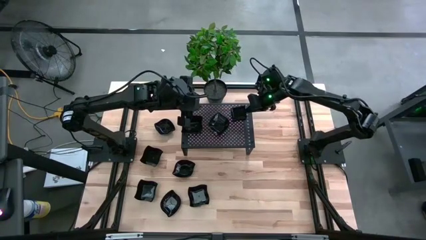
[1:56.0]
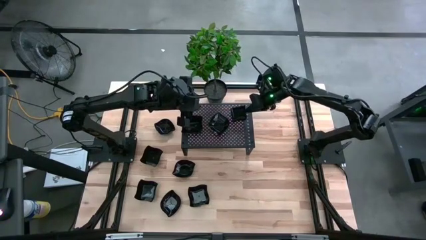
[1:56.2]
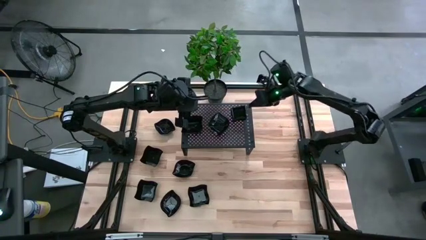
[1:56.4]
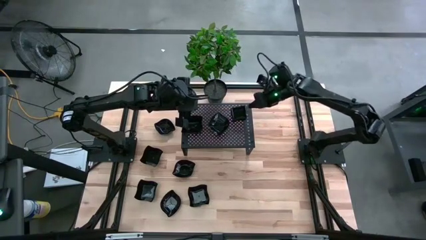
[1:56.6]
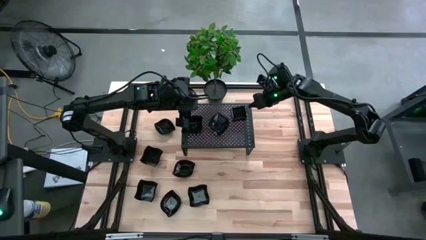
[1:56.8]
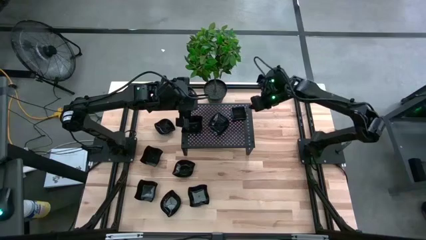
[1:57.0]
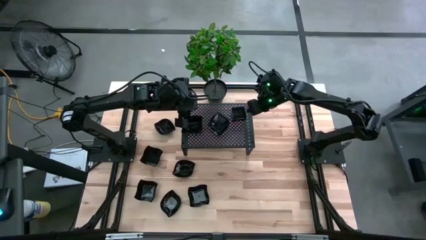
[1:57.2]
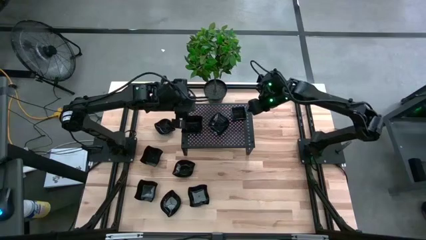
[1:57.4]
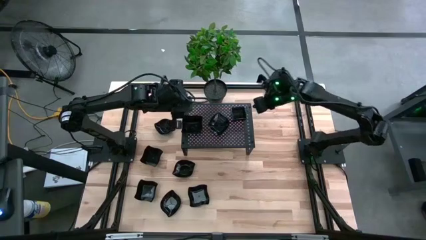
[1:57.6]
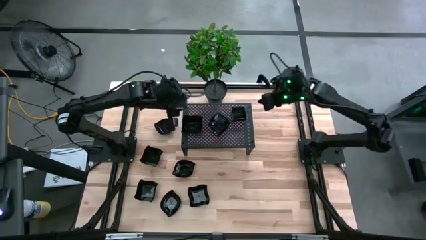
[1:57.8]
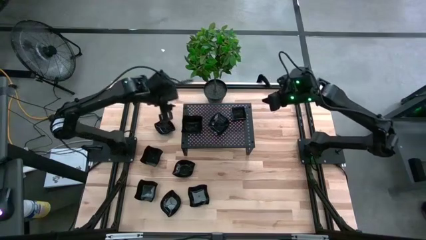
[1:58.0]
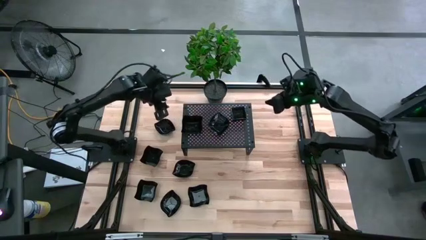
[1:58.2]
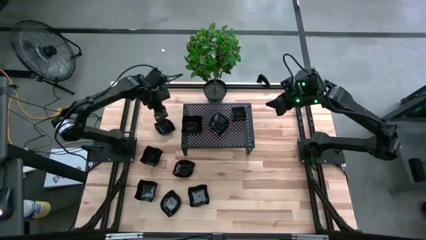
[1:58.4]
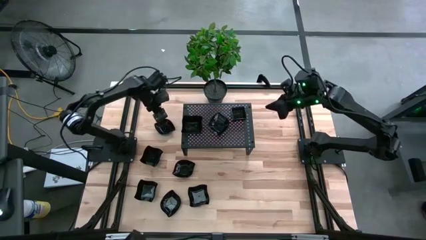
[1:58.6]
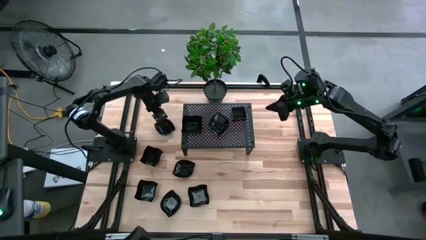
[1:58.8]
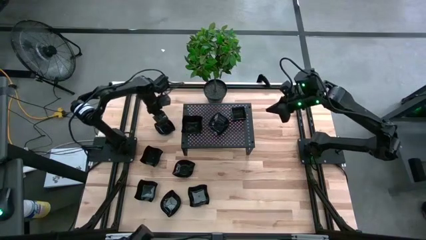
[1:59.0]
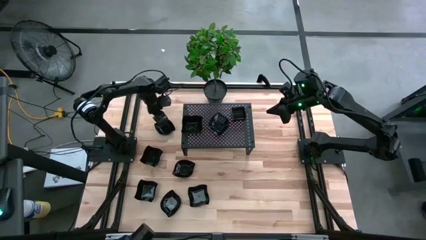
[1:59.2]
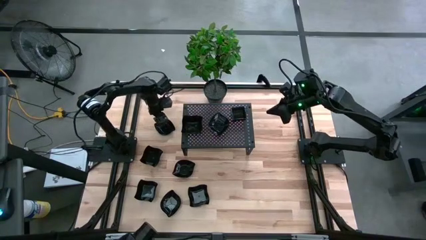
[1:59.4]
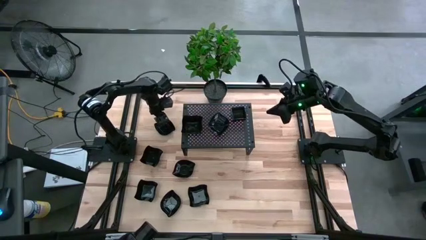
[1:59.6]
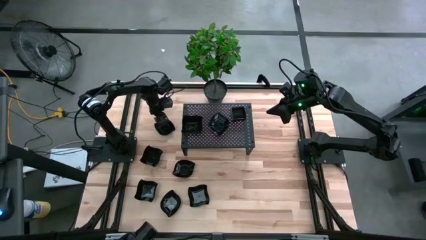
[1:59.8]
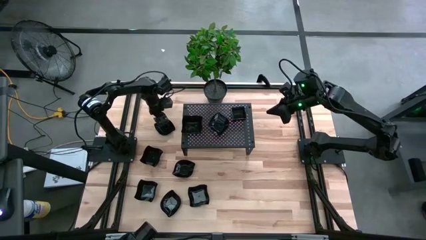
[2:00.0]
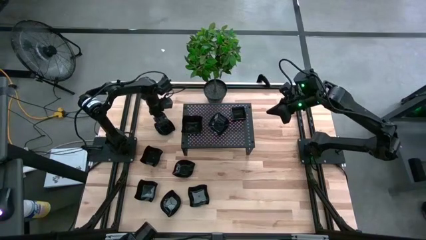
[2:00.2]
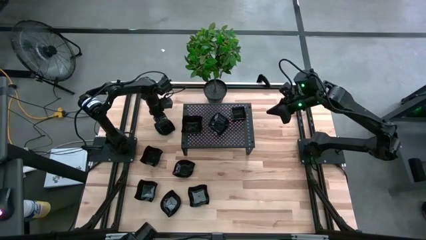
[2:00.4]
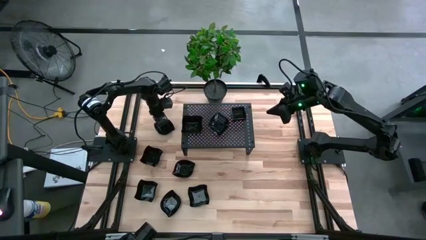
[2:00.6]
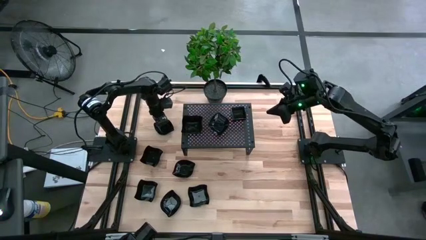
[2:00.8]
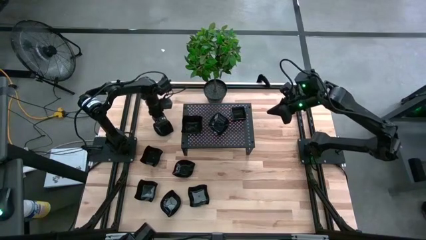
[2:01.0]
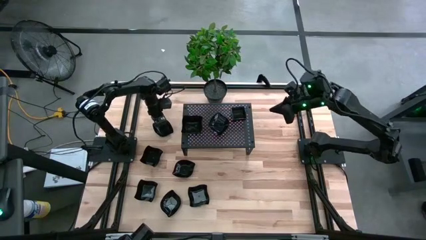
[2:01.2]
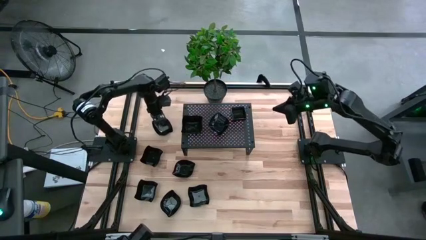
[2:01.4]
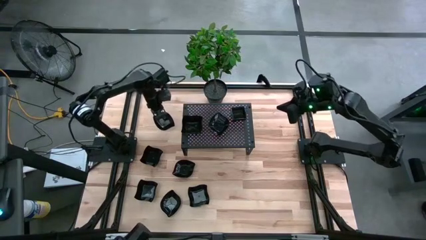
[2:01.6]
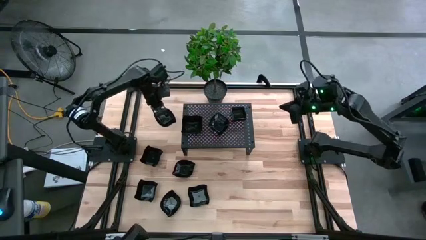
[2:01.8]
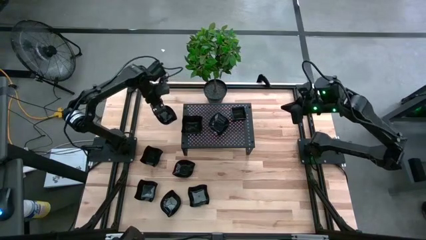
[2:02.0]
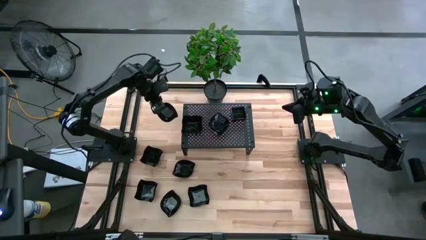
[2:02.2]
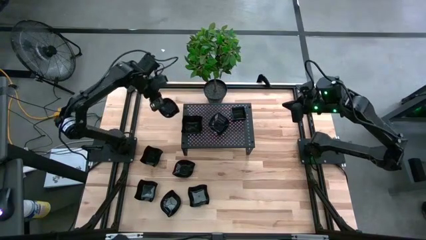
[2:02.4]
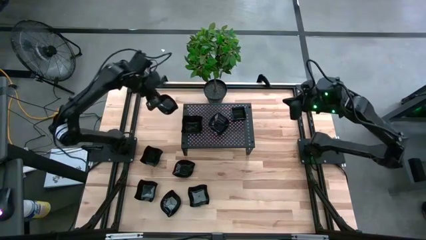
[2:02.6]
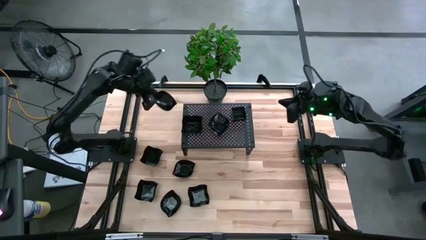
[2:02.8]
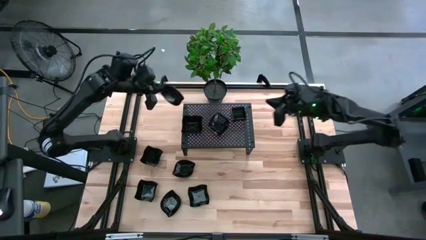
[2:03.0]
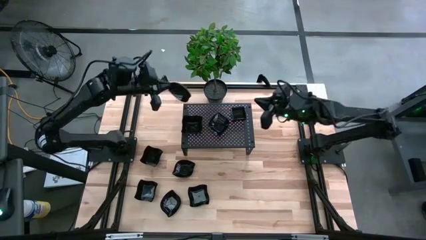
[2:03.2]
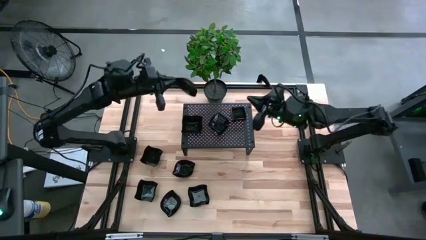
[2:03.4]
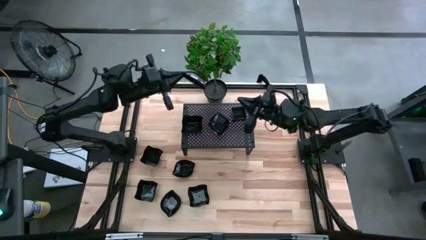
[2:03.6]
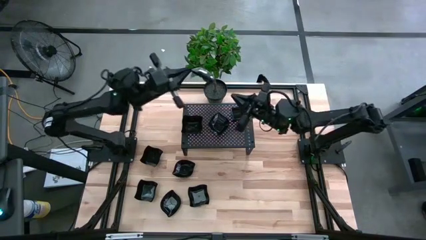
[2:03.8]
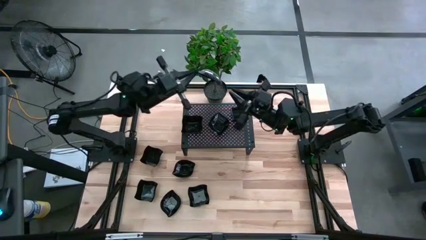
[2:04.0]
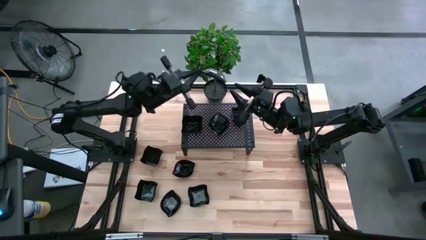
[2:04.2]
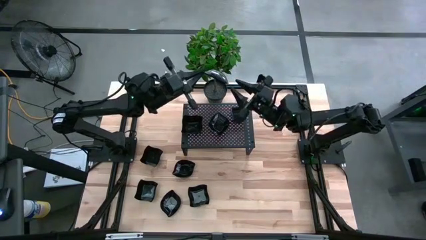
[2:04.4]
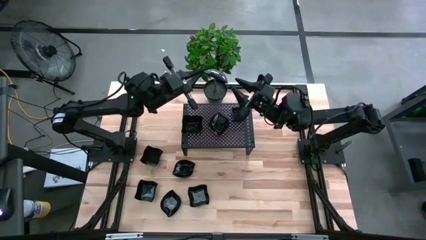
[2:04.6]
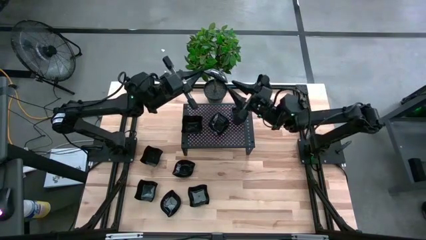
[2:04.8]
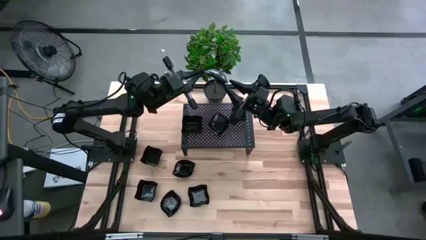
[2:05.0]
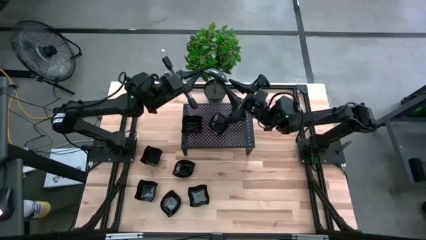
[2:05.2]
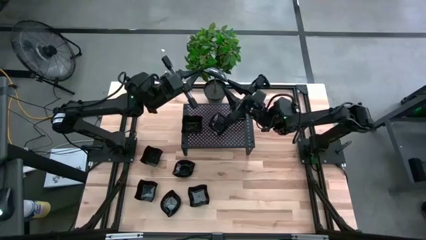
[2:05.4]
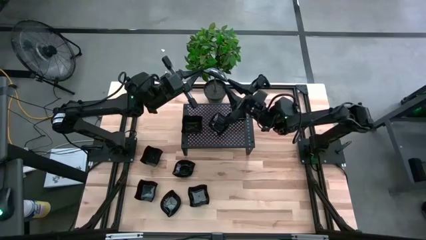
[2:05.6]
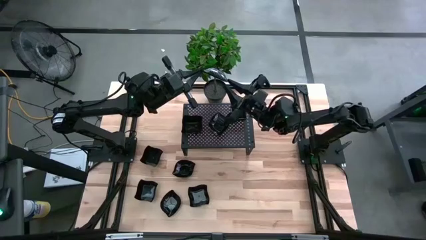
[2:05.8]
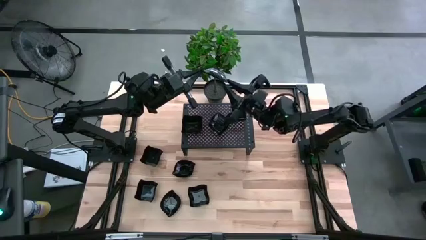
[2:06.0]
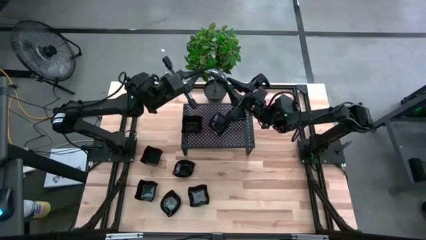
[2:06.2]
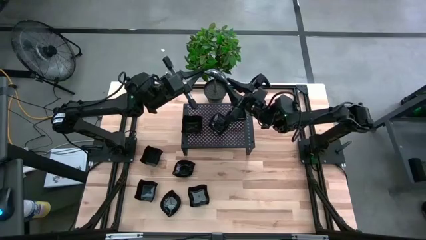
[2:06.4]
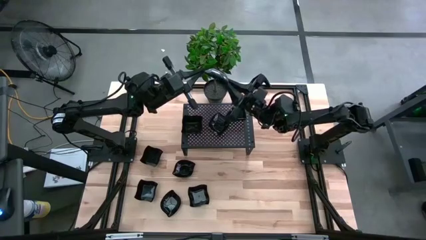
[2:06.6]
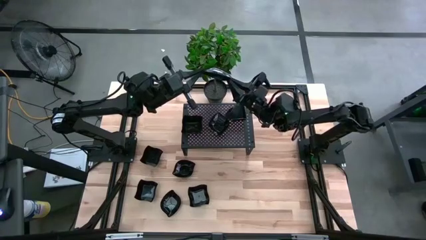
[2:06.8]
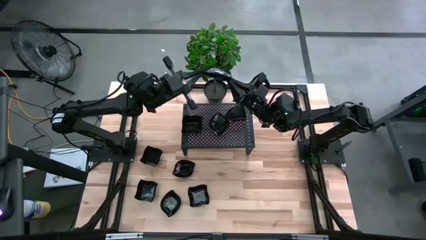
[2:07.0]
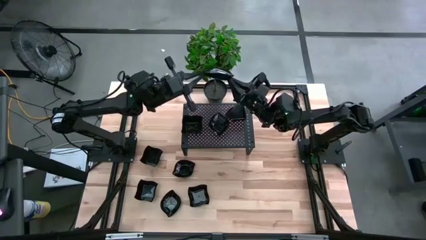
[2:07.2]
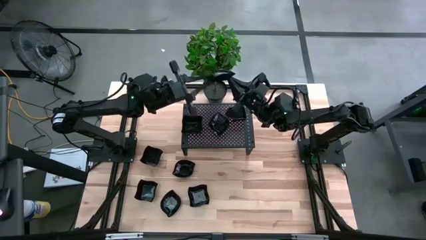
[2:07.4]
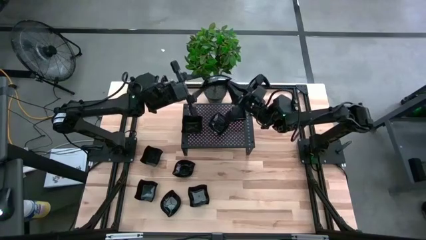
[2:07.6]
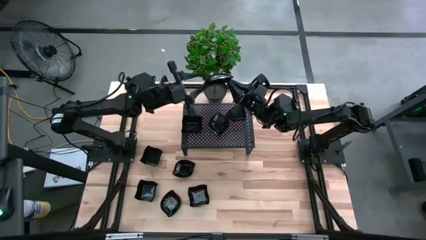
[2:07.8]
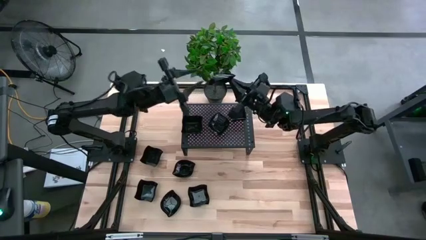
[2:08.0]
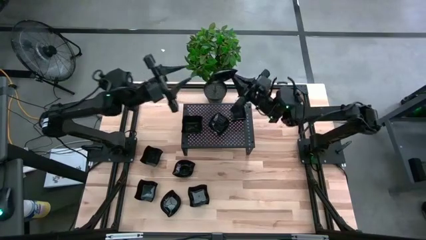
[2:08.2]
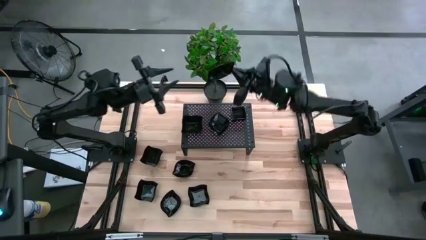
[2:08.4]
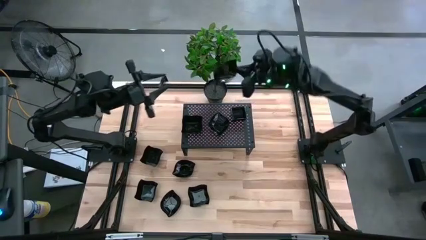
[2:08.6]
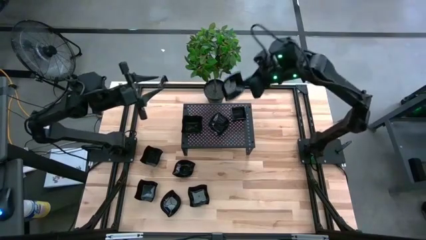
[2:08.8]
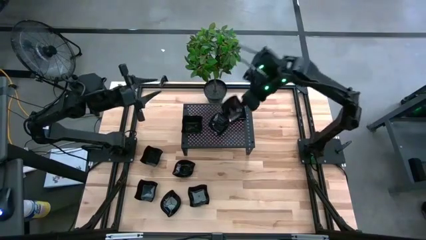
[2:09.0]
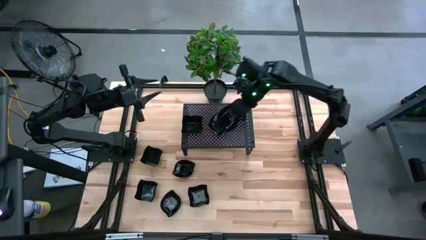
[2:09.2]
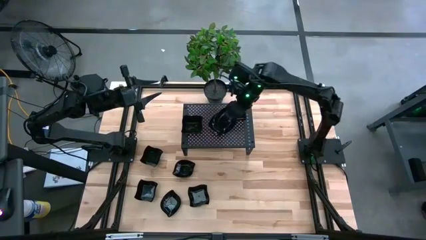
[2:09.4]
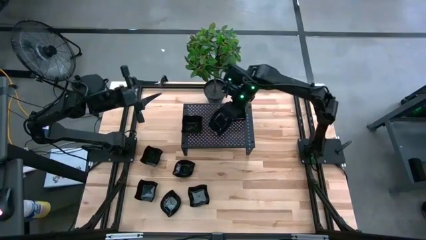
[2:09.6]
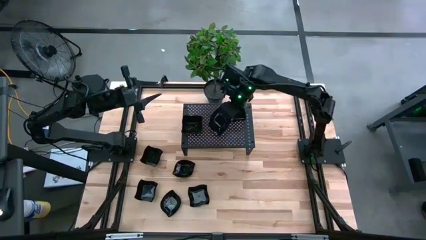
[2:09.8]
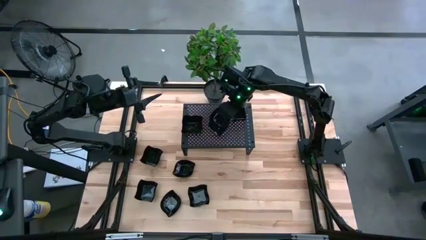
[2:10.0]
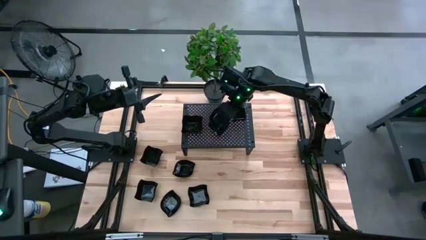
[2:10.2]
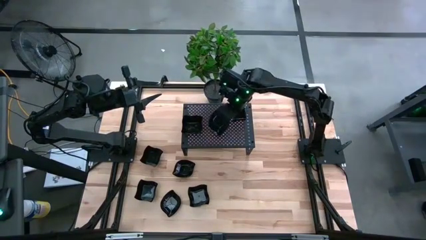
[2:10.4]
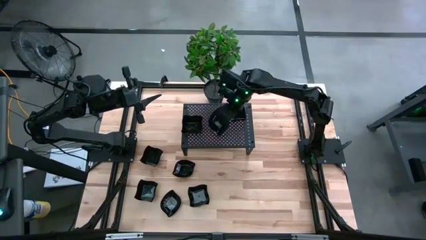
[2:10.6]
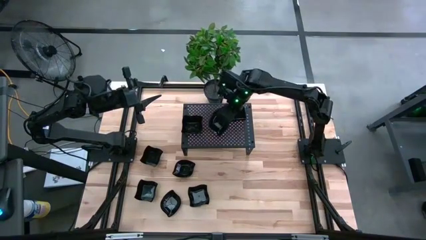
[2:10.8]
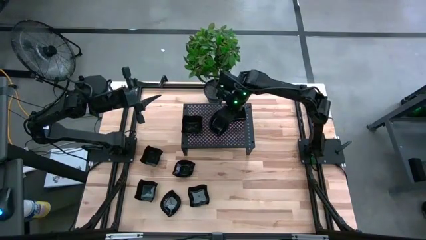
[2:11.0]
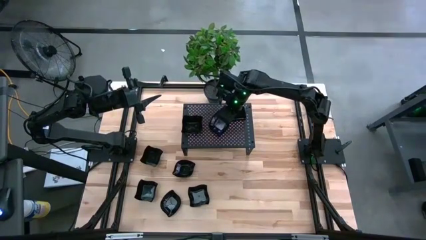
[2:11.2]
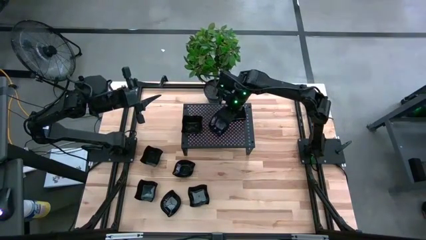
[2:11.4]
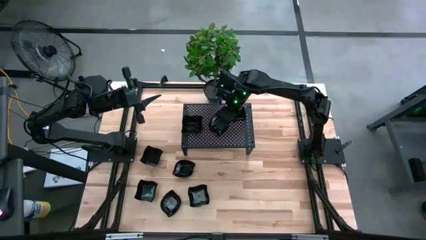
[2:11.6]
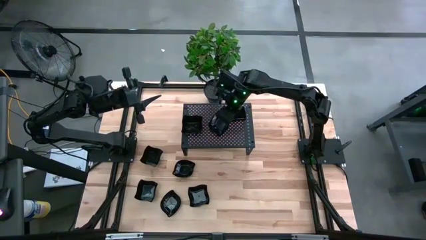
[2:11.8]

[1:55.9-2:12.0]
Task: Pick & Place Mini shaped plates
Stack the black leaf-shaped plate on top of the other black leaf-shaped plates on the shelf
